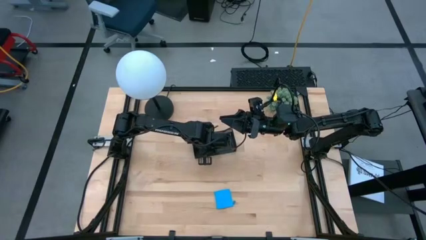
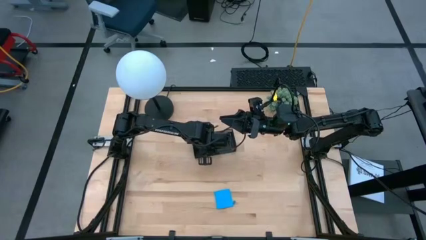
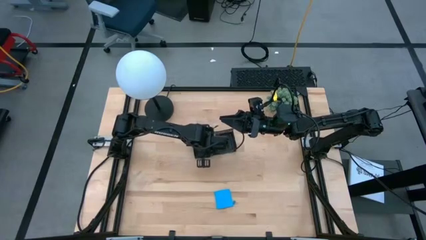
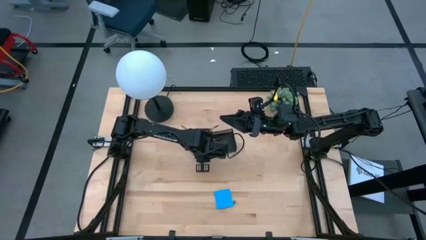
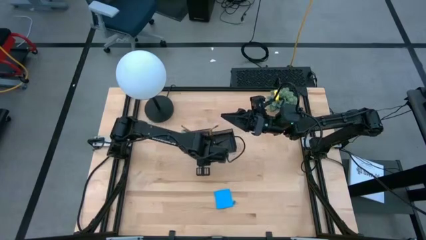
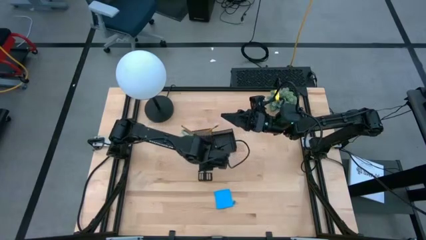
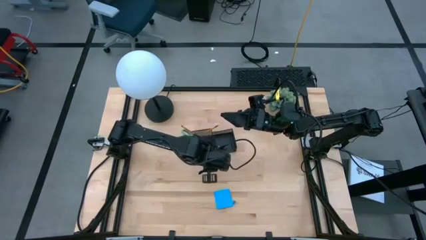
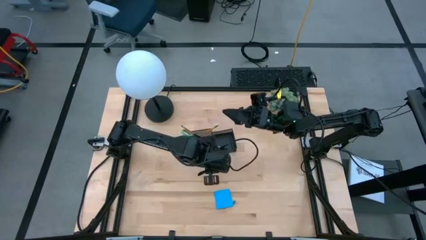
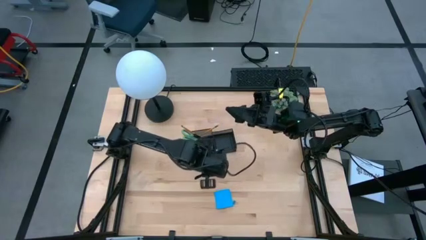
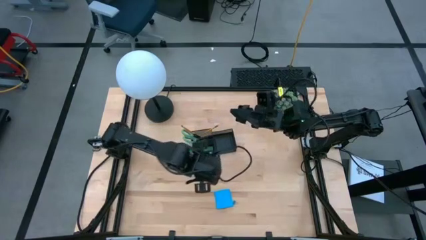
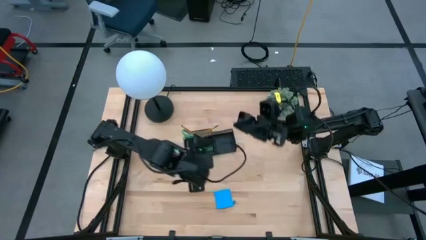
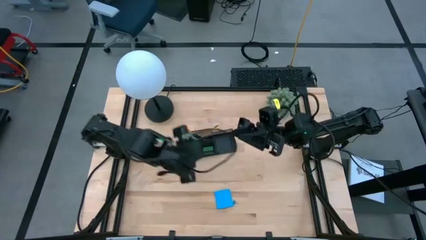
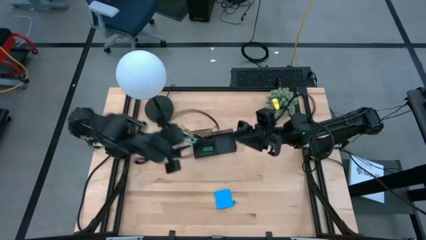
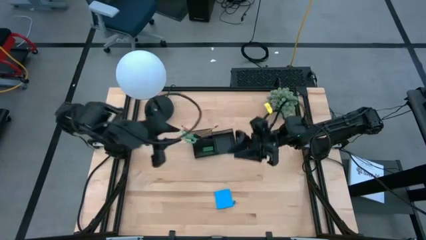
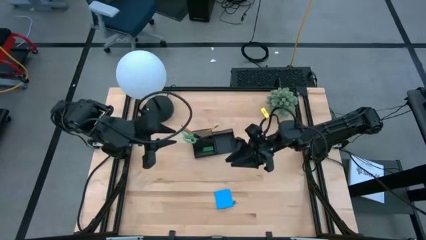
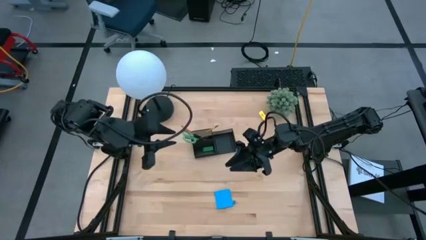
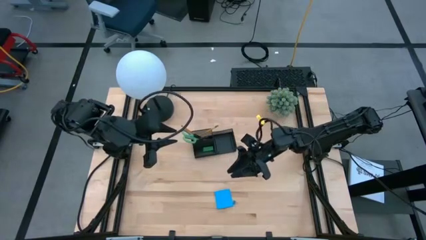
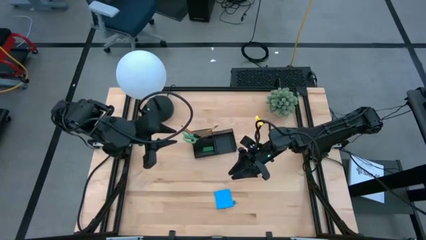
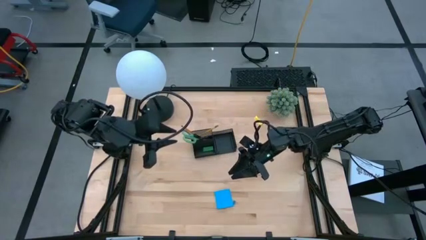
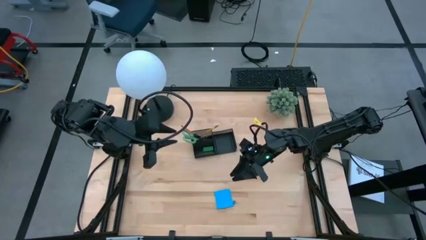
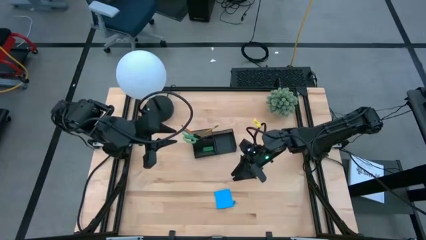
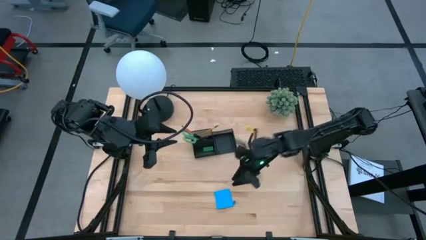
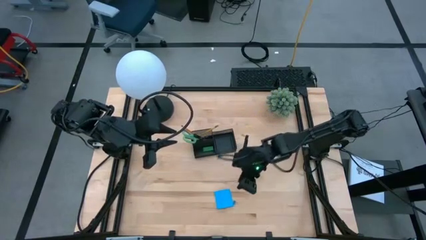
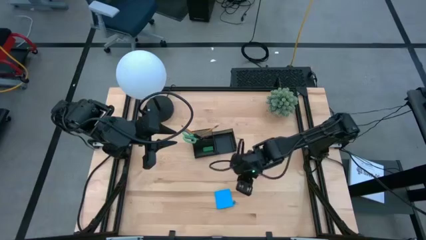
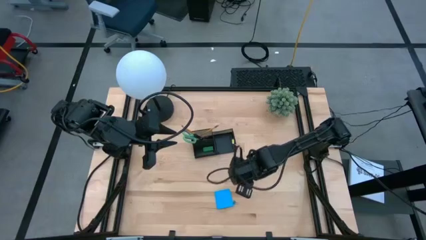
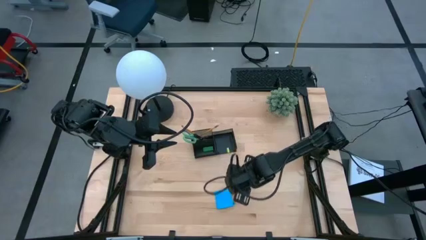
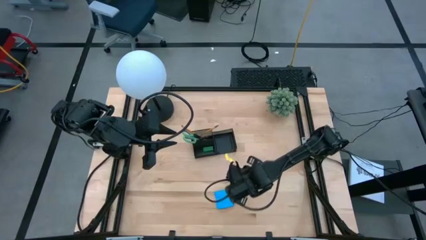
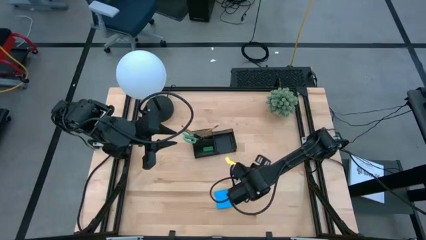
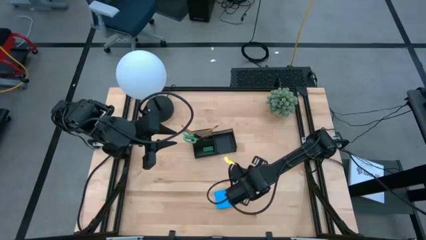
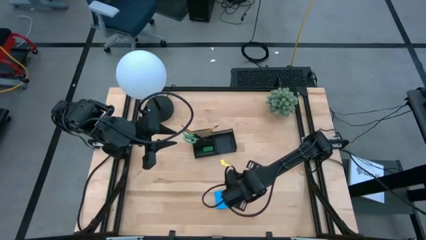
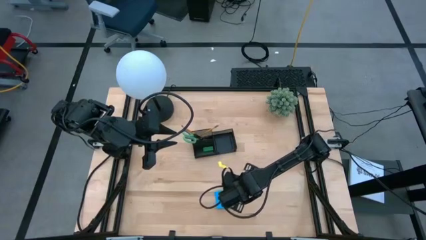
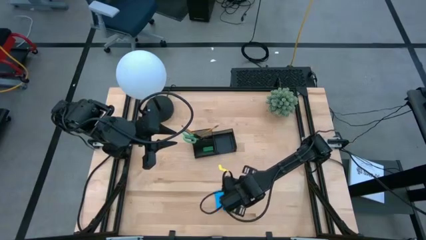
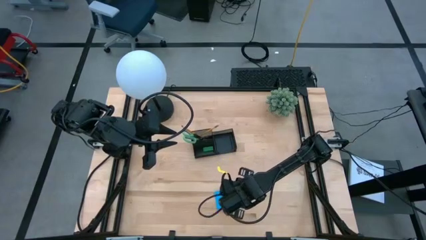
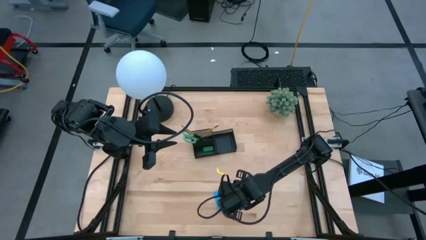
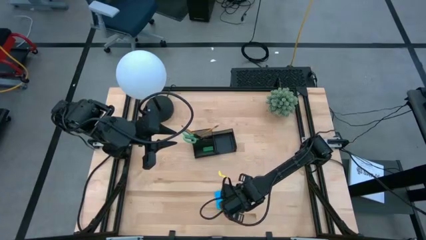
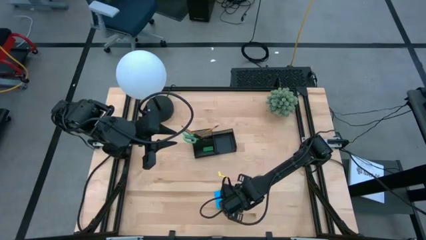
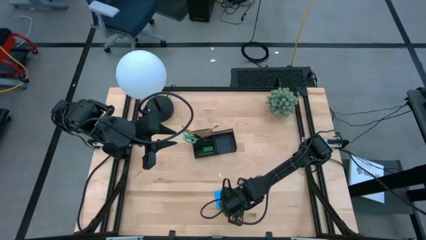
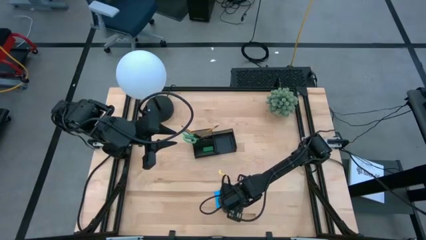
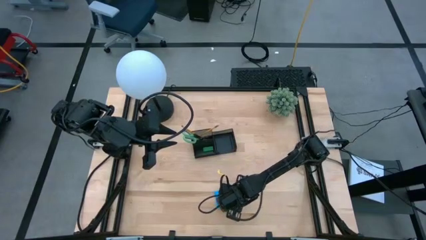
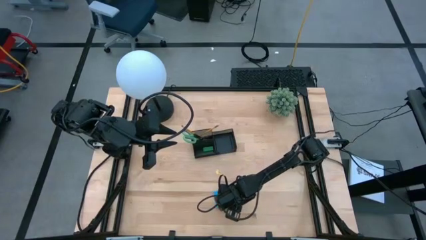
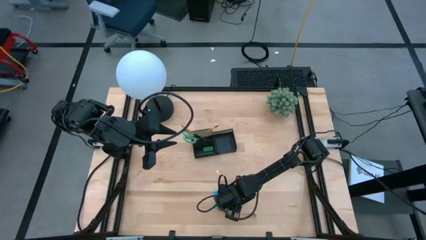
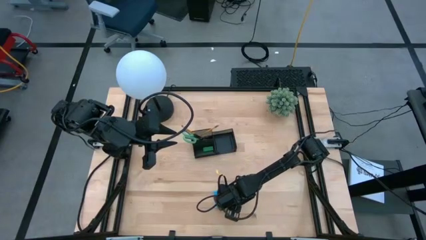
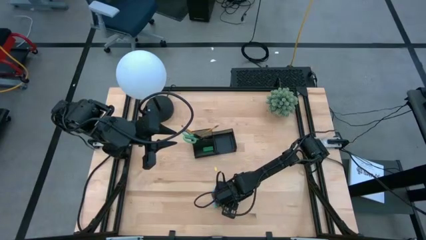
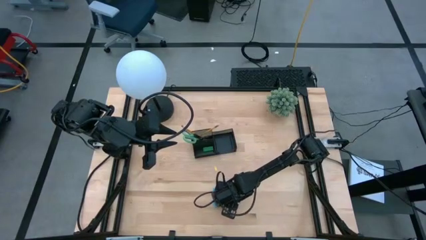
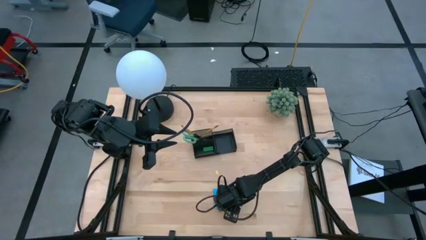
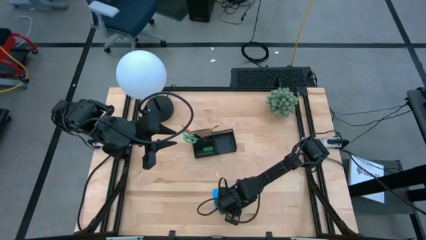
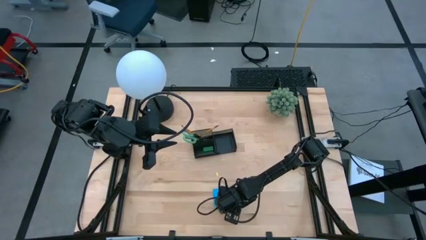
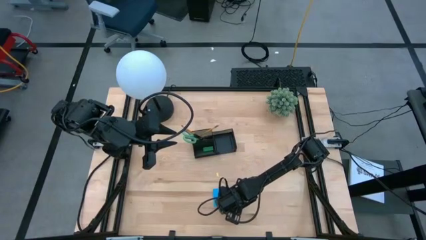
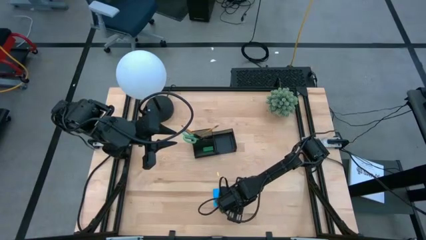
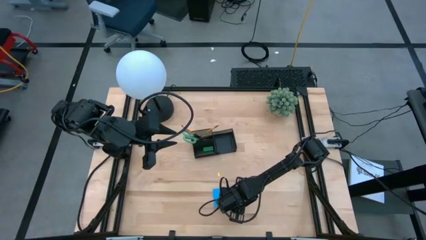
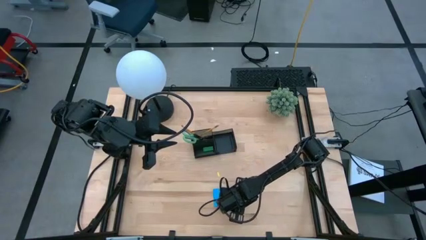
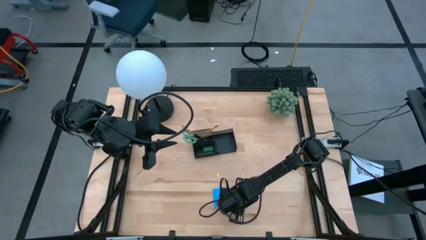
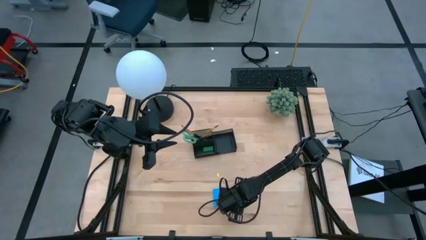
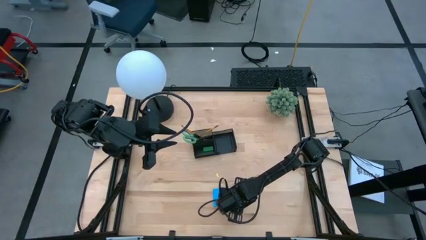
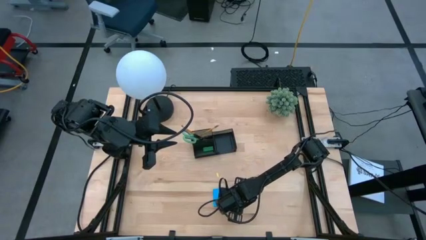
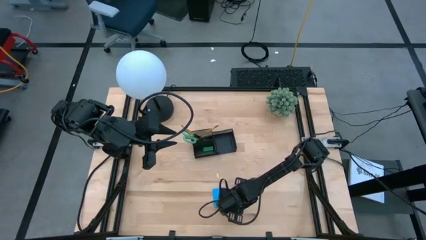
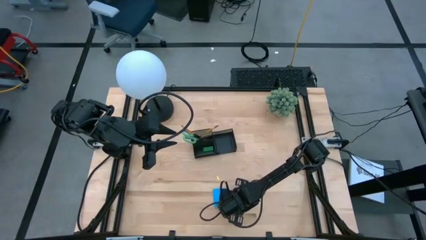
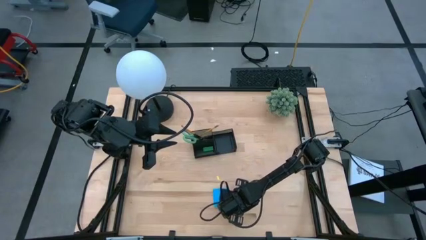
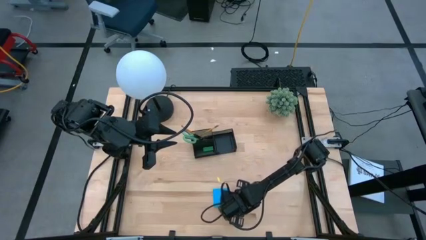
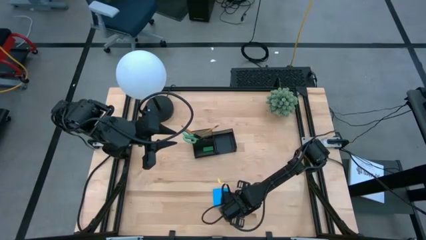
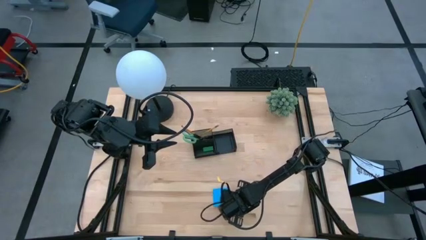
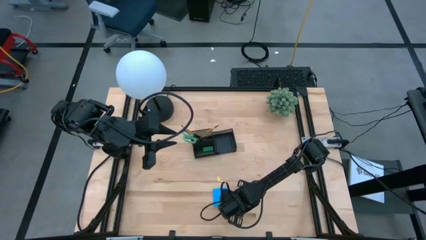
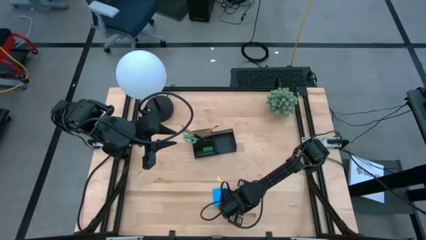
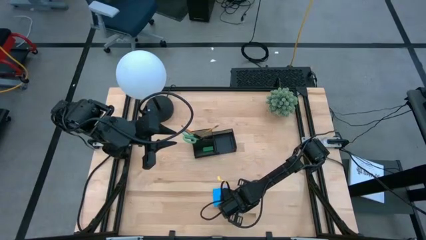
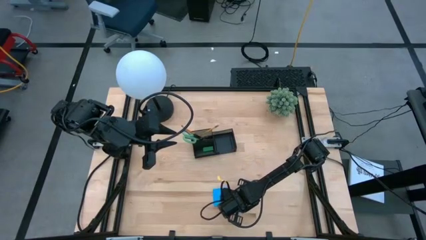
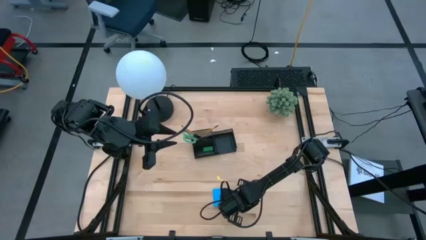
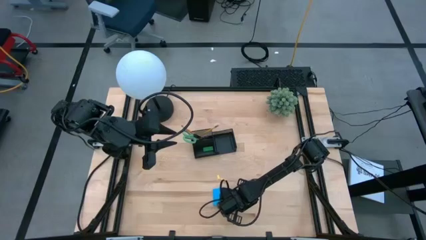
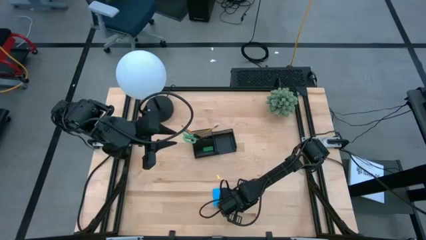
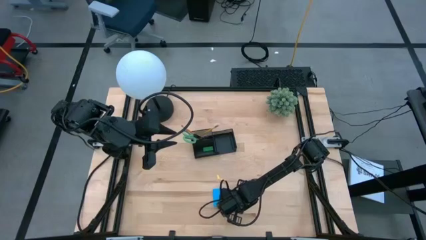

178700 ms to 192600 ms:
Task: Pick and place office supplies into organizer
Put the blue binder clip into the black desk organizer
